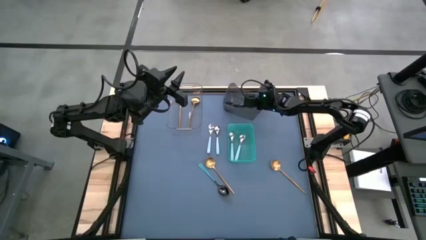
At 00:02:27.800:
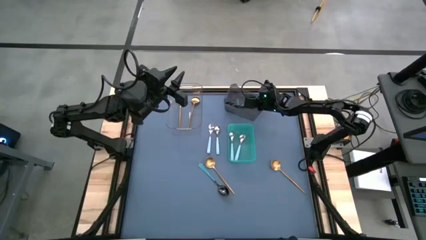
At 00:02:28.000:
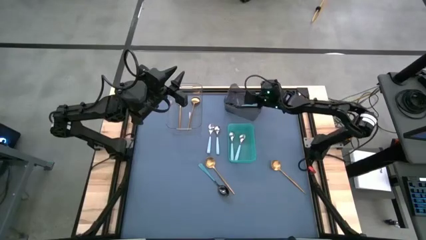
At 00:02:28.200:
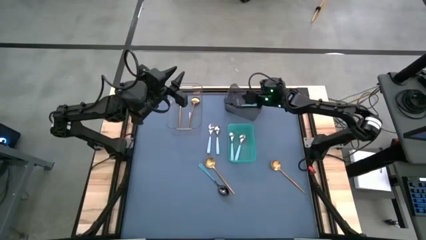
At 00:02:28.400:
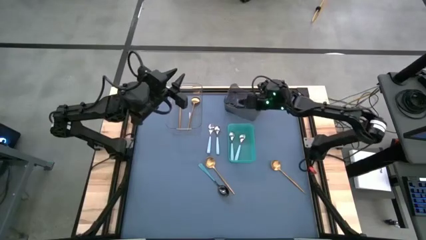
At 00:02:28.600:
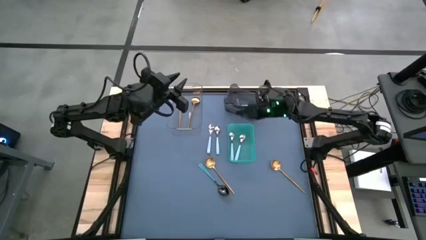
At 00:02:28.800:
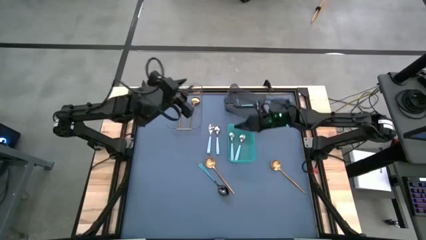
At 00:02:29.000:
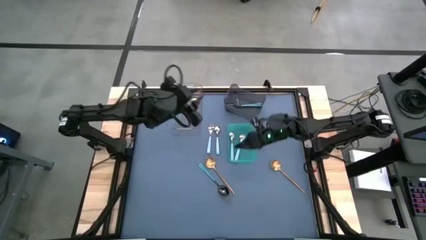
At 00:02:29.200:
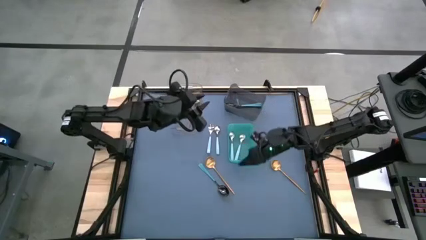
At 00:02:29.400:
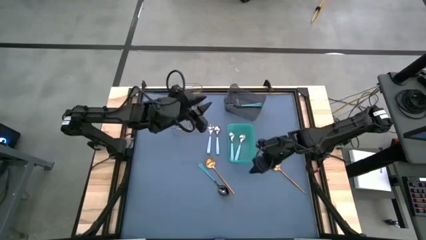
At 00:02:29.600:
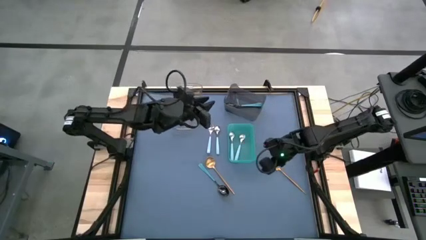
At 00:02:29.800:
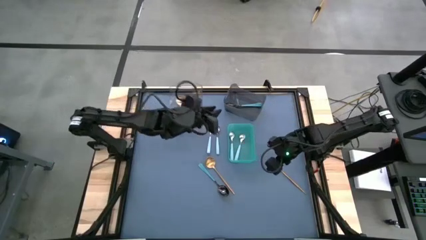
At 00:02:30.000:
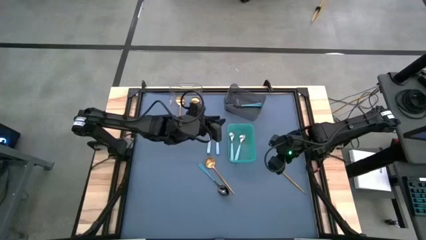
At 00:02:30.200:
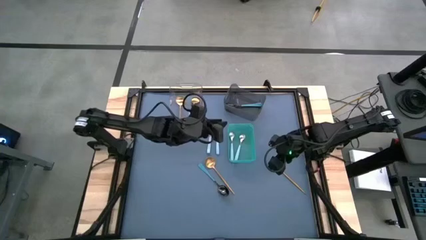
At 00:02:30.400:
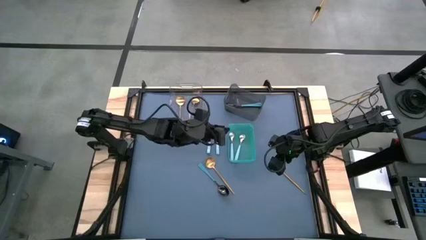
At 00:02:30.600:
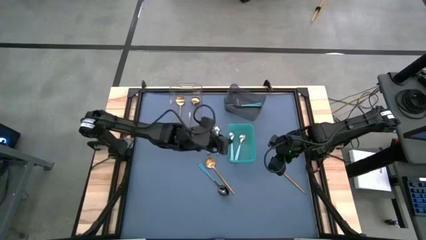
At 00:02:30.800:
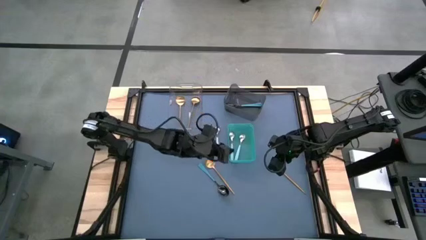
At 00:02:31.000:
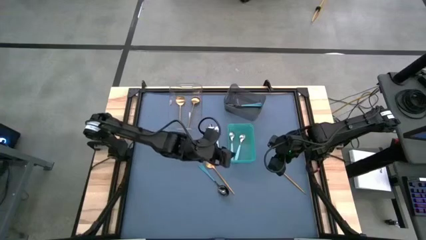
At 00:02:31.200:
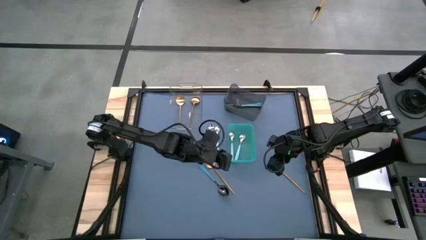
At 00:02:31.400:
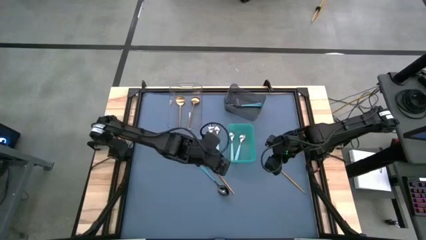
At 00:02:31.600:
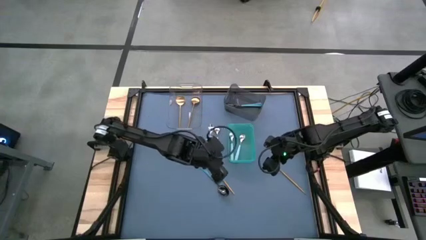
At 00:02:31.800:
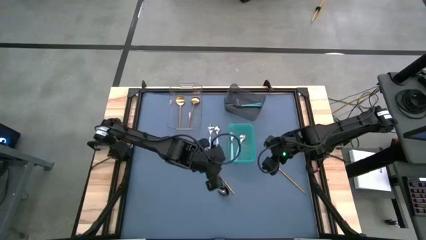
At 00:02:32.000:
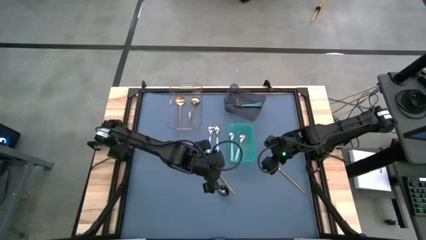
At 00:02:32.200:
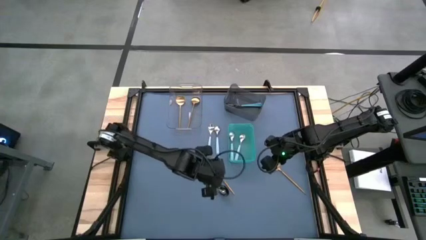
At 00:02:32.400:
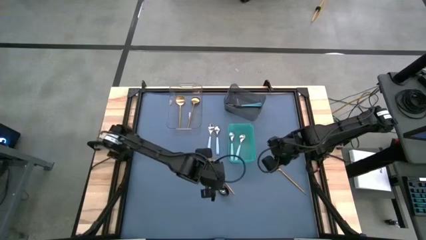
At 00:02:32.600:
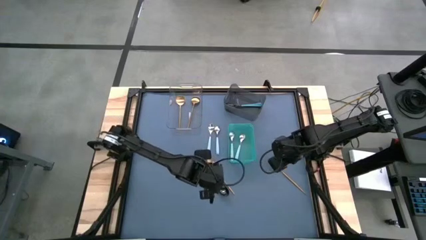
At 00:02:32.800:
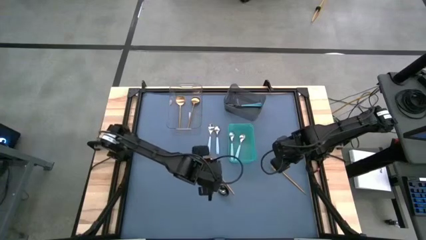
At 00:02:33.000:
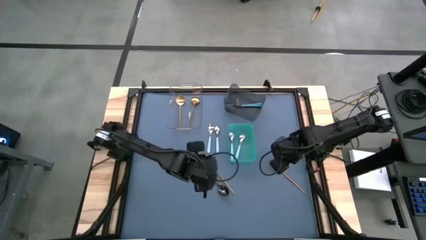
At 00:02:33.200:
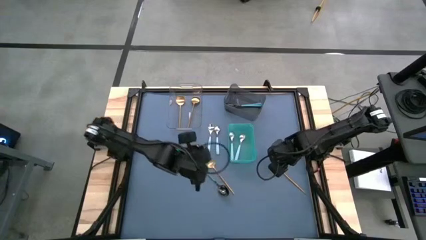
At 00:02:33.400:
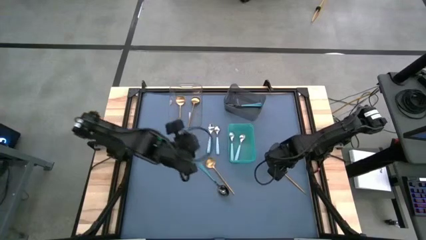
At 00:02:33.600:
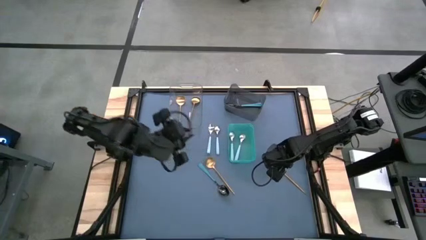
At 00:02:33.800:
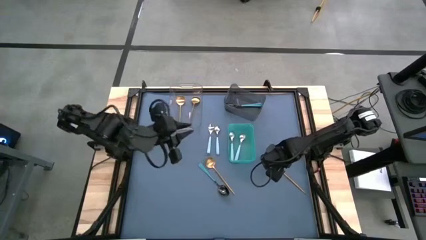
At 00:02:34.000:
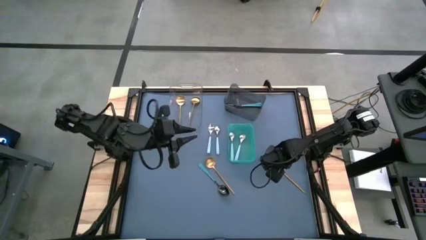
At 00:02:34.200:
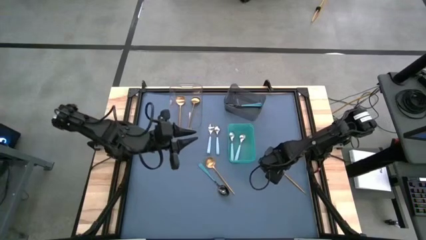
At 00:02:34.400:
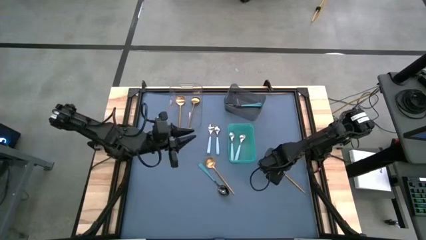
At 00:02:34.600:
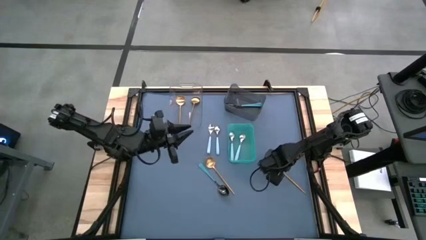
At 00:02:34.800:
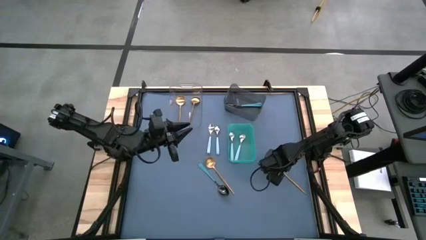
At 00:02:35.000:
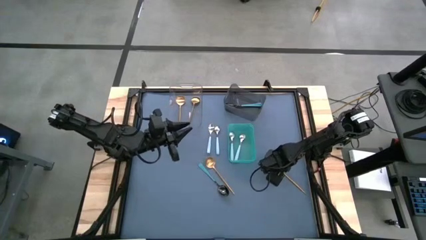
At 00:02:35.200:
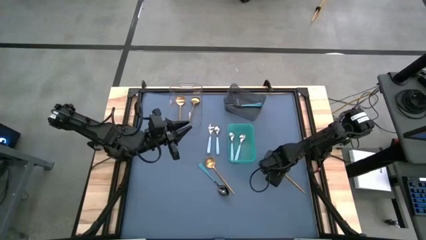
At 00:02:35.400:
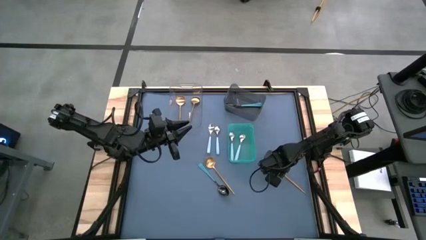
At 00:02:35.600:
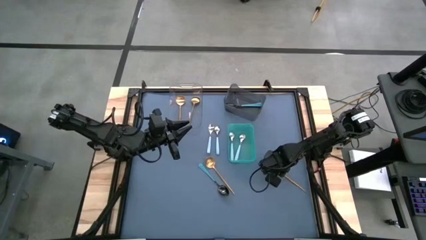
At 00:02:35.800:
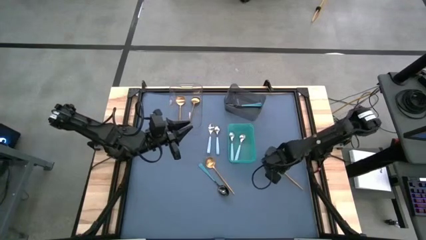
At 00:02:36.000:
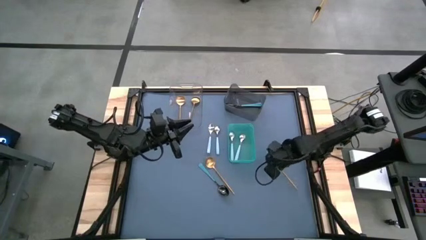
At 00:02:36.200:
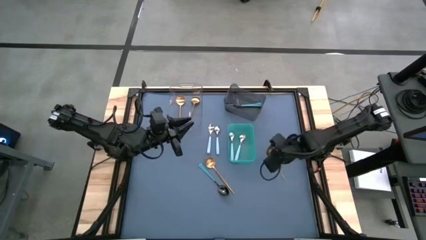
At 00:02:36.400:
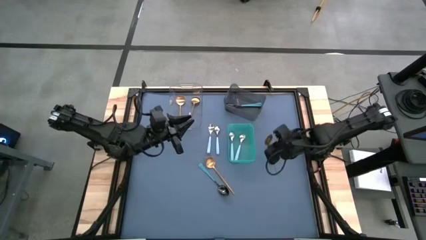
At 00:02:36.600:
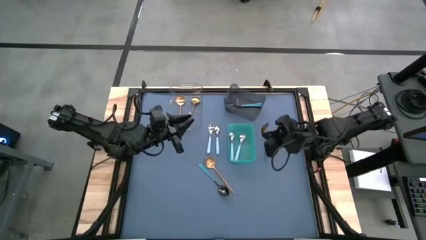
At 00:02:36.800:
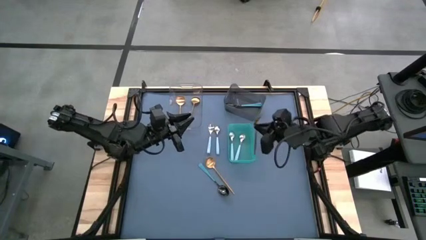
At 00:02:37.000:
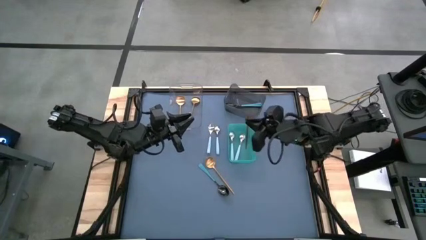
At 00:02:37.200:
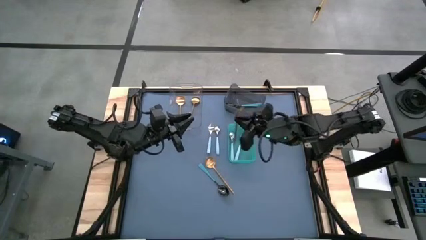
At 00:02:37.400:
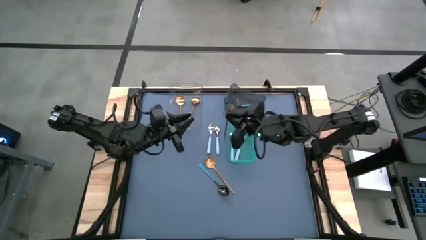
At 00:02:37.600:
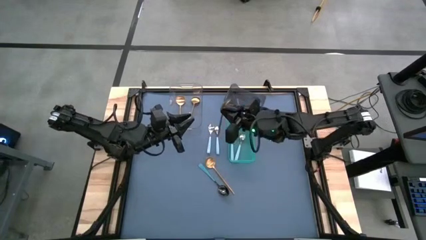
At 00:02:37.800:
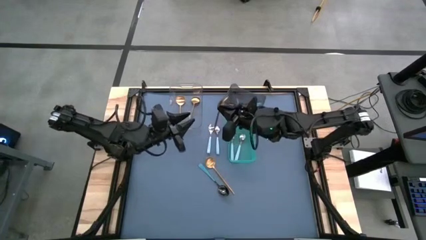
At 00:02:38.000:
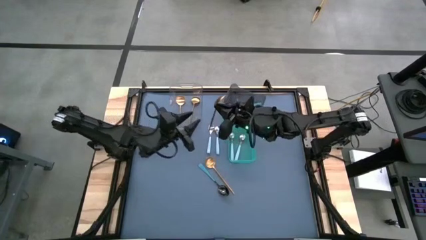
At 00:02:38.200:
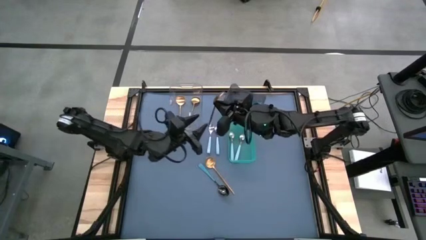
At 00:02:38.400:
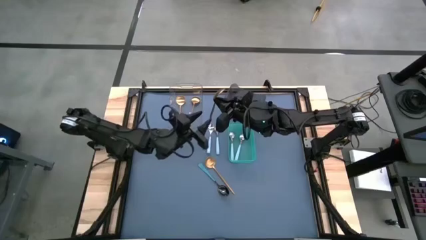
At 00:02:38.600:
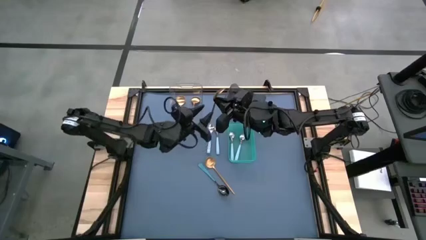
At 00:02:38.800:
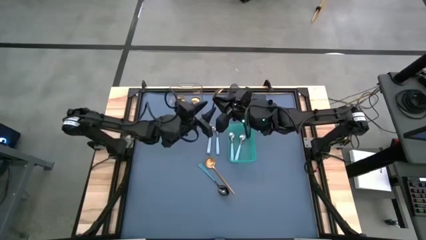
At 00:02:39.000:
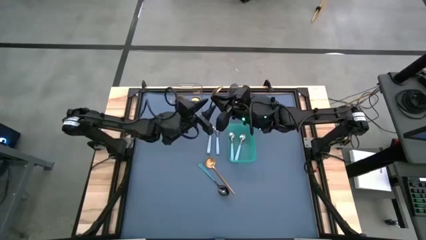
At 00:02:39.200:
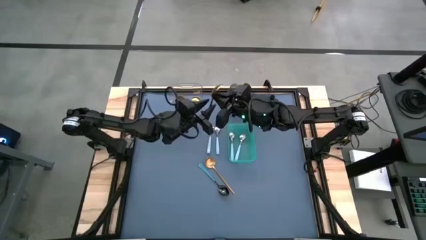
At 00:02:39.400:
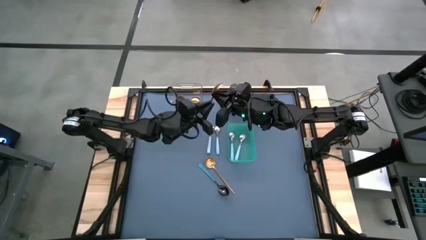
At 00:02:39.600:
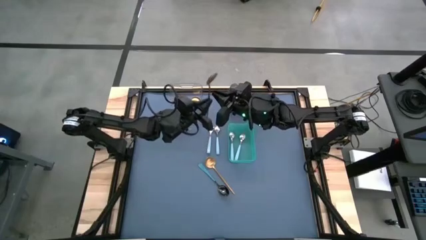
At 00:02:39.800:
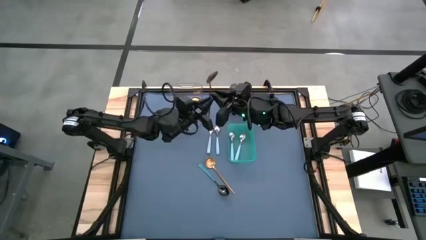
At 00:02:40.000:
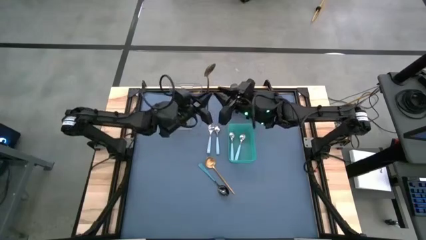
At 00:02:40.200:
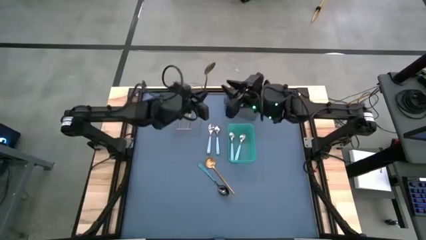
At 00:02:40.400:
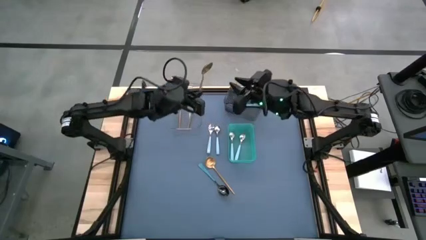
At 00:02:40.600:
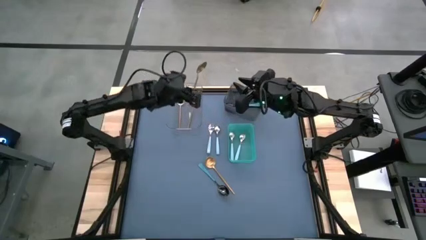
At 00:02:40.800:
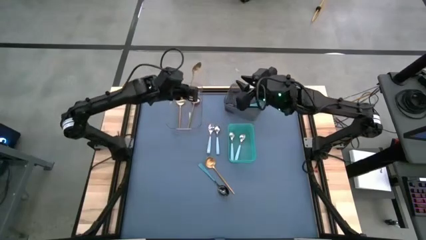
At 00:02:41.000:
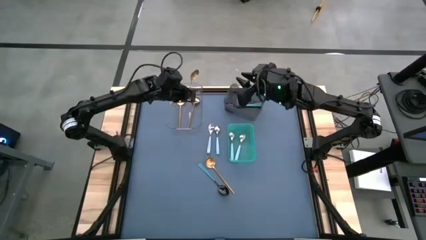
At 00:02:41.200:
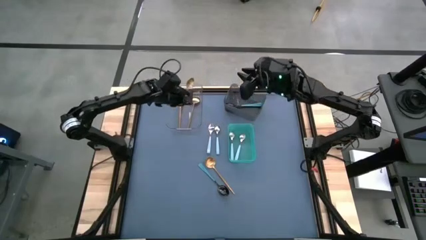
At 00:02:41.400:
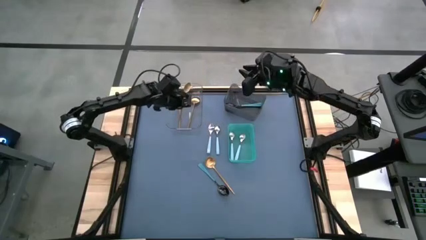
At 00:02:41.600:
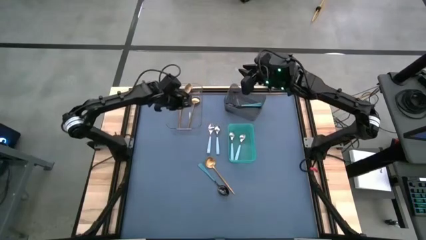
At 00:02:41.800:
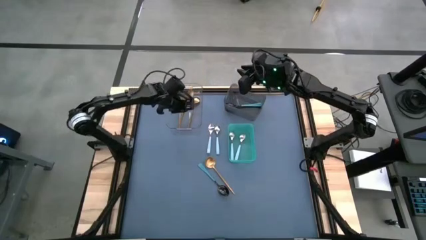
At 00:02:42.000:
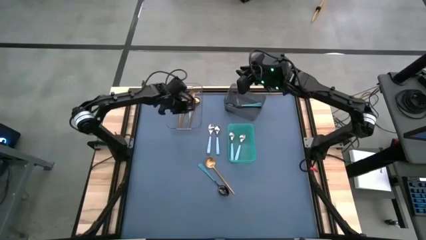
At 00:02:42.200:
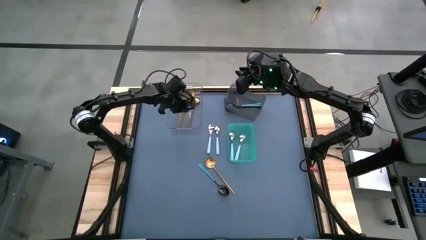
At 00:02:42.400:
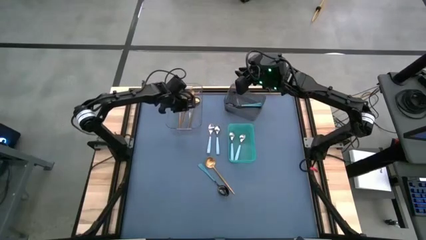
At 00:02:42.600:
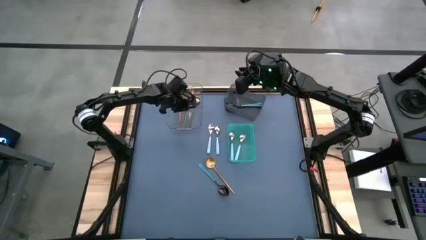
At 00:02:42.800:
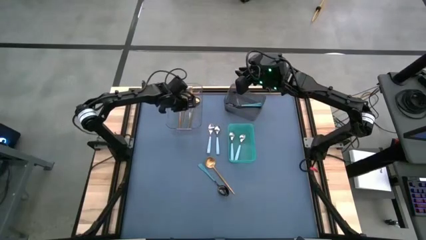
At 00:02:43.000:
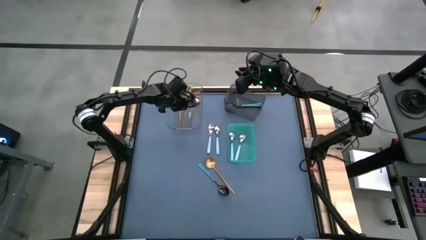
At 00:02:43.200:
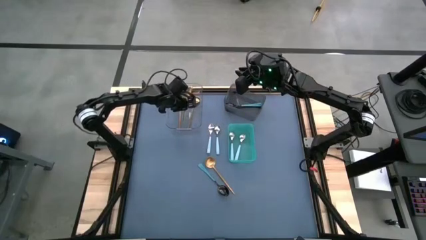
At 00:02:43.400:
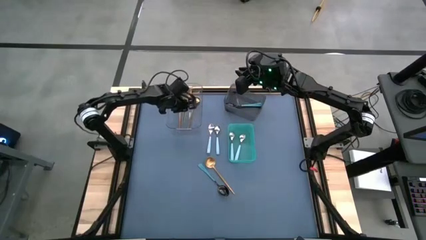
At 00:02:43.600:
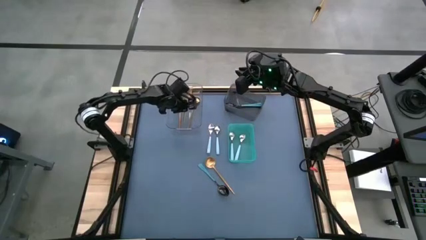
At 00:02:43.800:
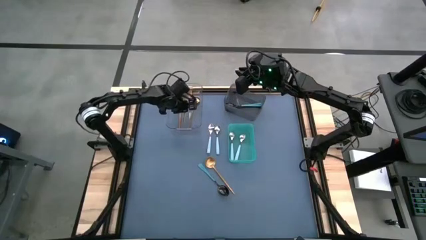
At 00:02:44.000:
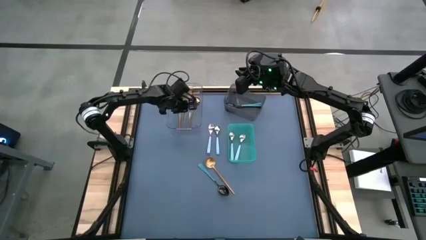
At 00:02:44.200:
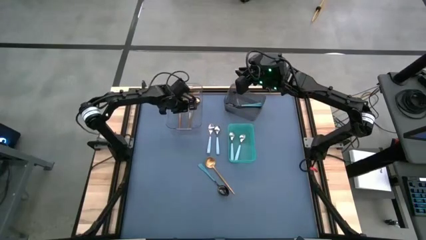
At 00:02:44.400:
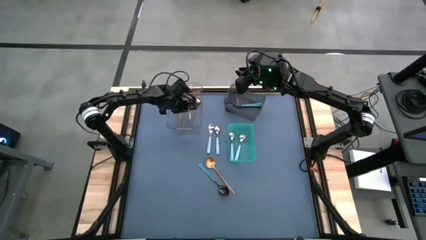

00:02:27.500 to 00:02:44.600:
Task: Sort silverware by color (type)
Put the gold spoon into the transparent bin
